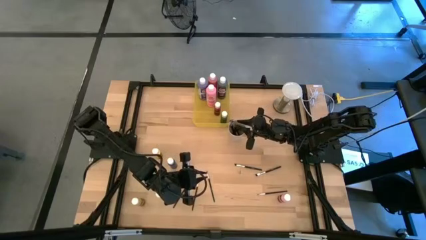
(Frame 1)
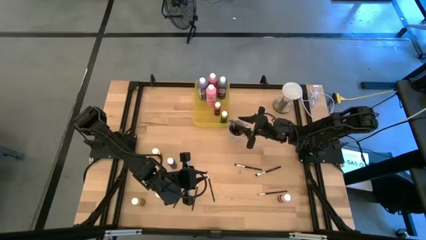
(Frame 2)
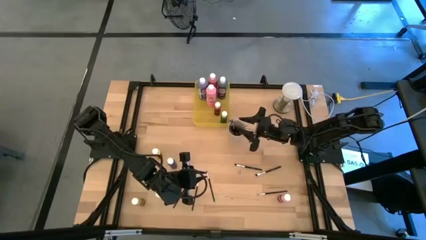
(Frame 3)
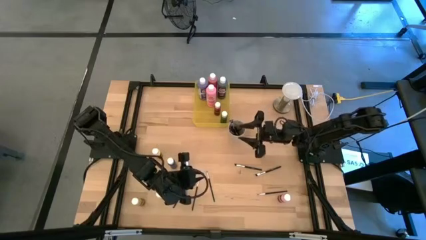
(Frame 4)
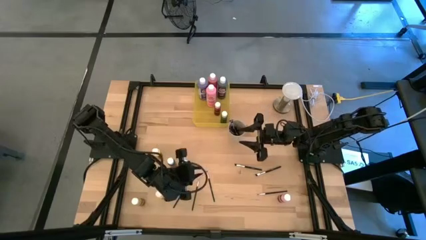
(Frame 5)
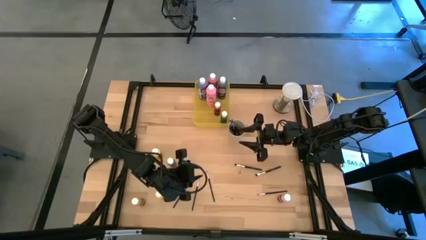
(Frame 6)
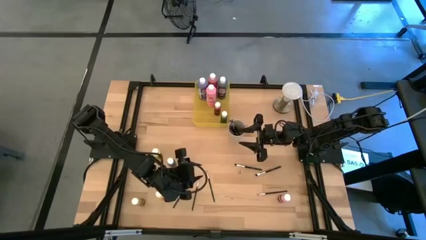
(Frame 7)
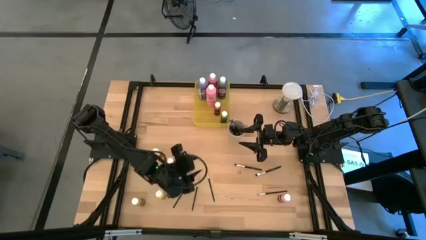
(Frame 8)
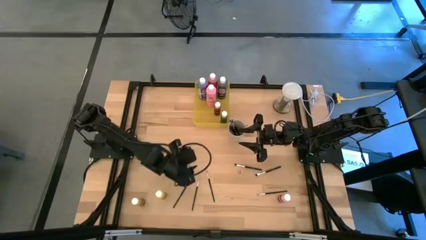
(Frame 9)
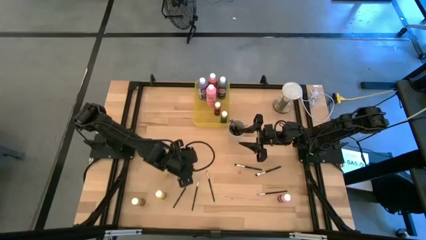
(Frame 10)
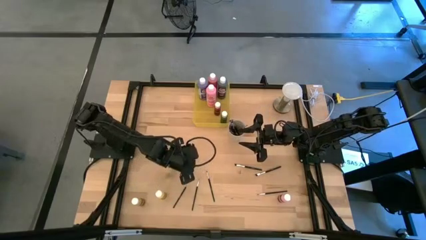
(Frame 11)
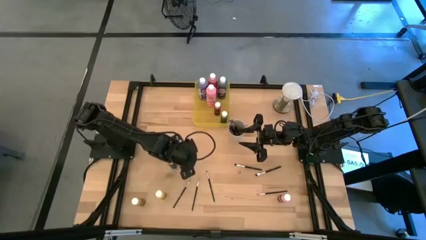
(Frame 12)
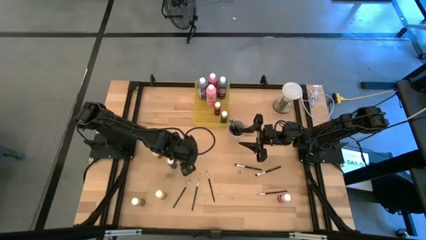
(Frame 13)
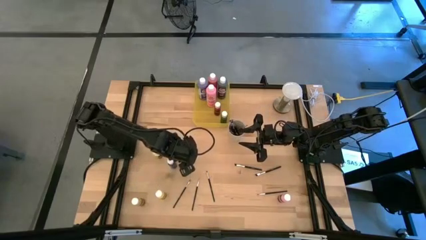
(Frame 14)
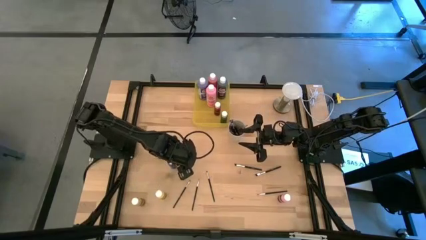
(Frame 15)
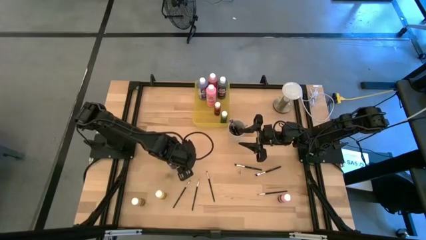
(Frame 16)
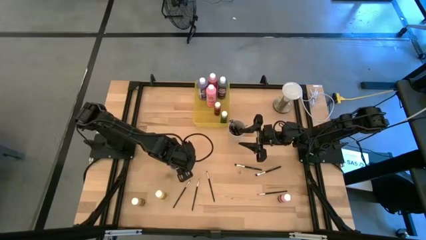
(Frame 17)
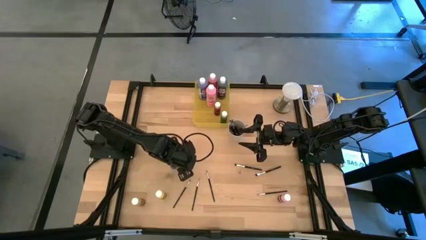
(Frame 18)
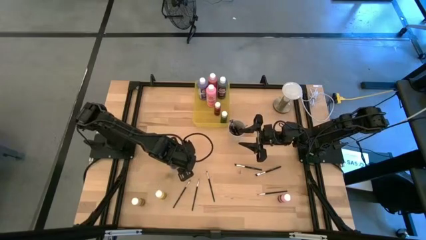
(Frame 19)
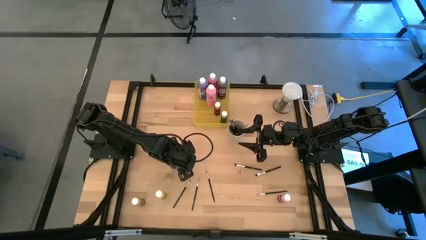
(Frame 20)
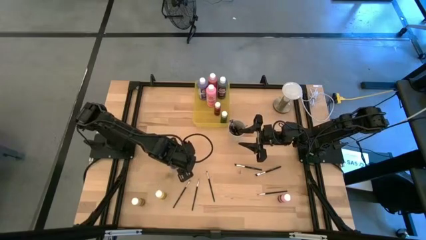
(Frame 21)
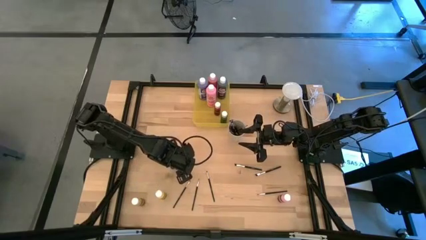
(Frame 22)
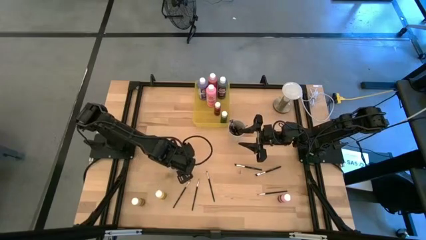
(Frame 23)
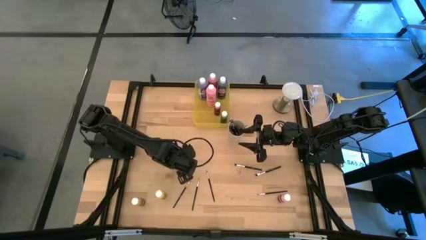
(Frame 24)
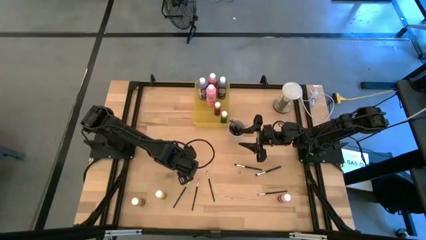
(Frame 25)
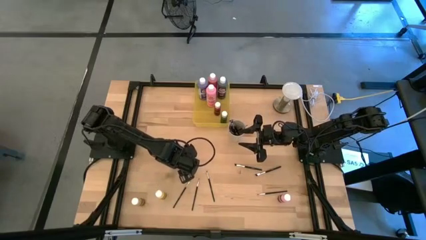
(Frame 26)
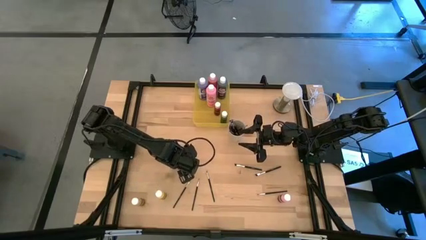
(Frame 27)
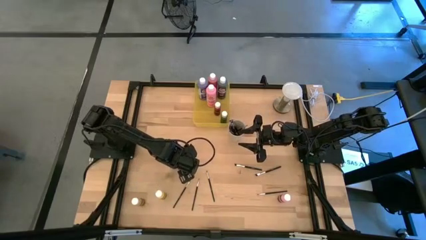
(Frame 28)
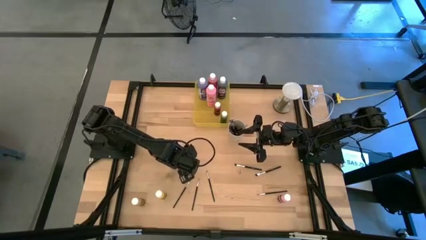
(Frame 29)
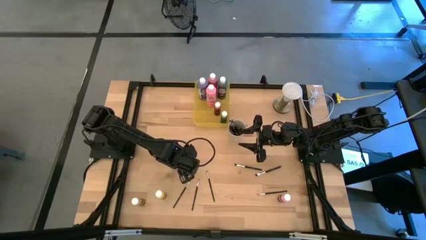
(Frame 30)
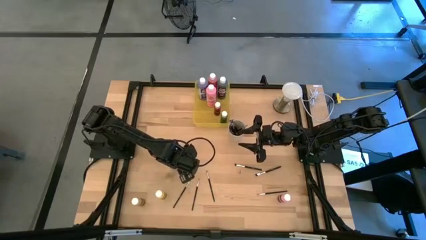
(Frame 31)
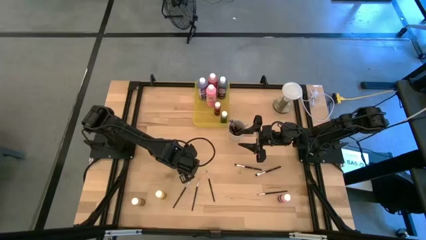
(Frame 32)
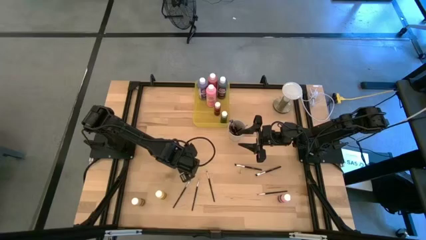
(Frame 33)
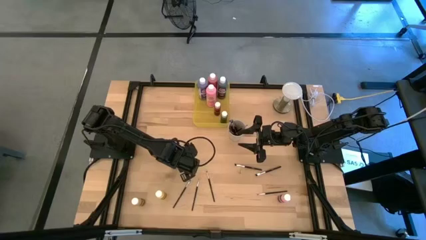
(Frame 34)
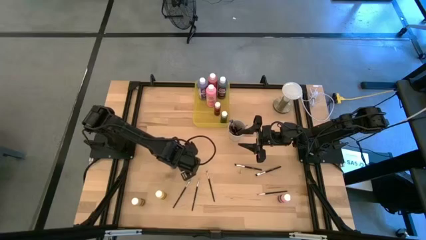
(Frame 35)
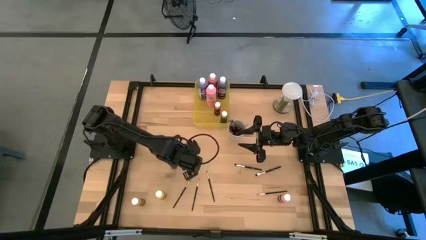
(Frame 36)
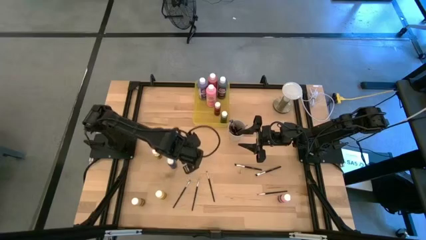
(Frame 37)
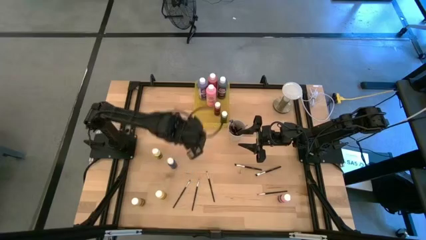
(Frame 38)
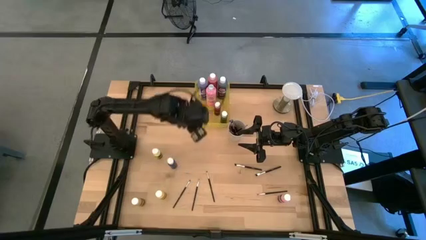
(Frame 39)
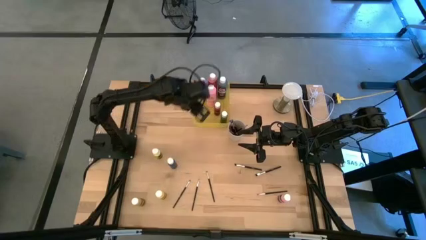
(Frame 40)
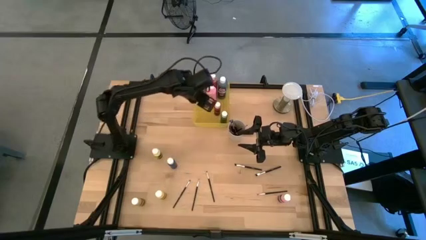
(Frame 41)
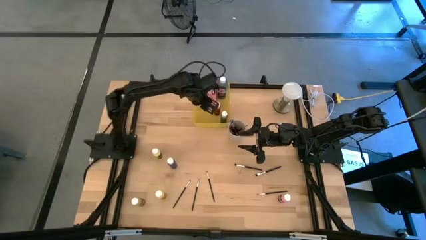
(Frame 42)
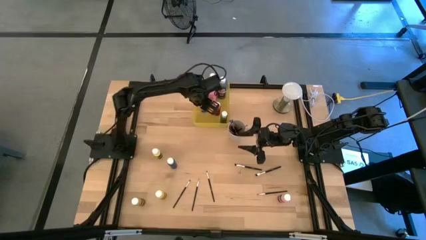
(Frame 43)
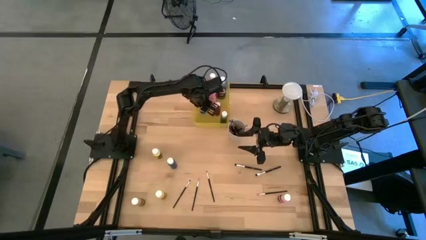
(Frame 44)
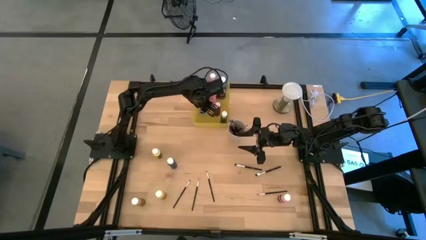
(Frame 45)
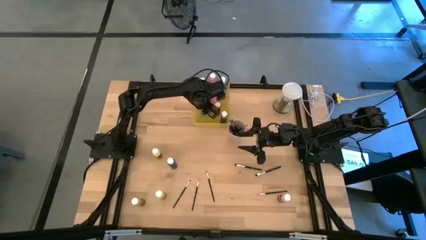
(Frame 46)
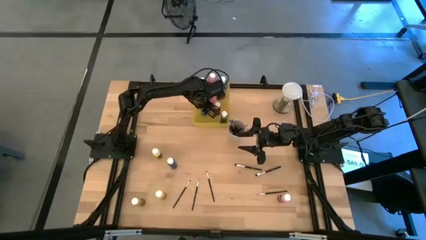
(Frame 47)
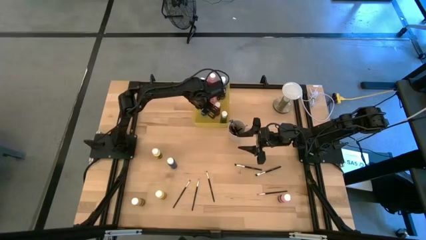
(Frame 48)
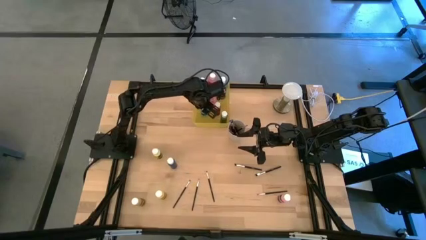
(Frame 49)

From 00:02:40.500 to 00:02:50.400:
Task: Pick & Place Paint Supplies
Put the small light blue paint bottle into the yellow bin

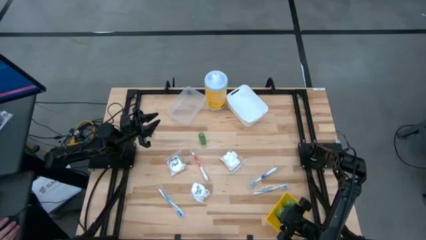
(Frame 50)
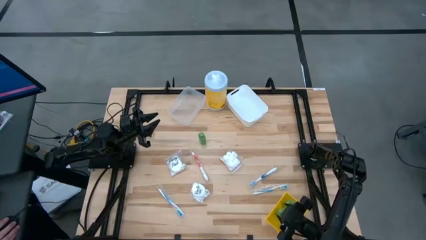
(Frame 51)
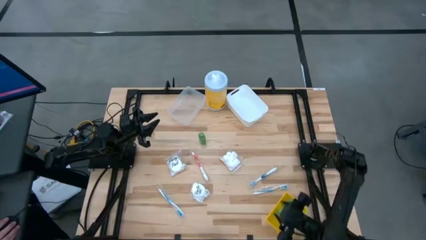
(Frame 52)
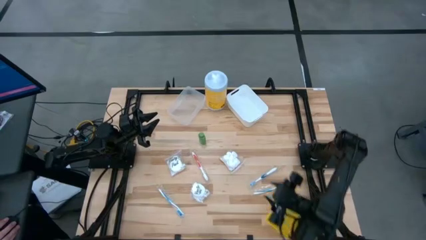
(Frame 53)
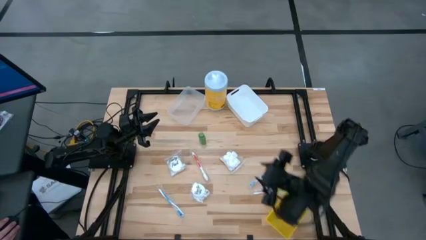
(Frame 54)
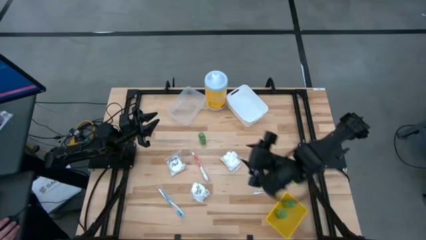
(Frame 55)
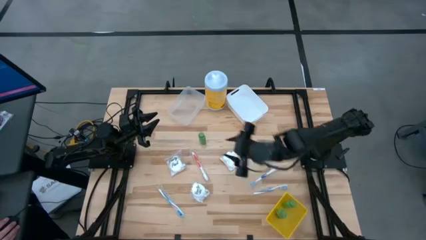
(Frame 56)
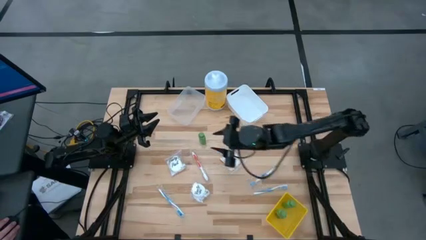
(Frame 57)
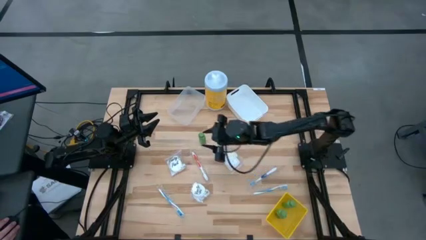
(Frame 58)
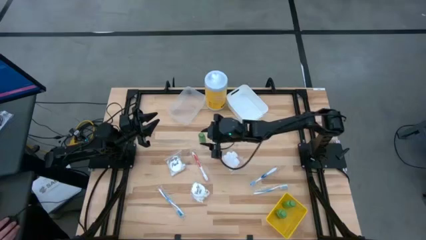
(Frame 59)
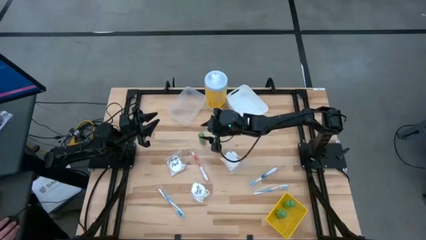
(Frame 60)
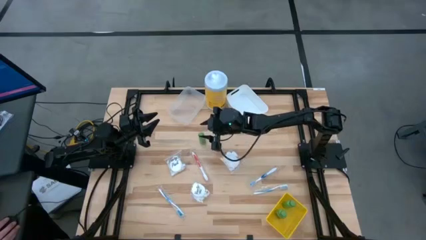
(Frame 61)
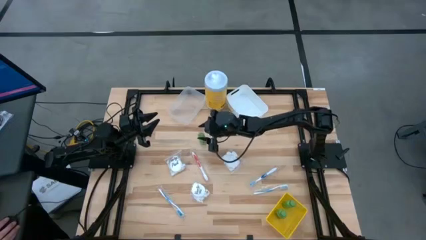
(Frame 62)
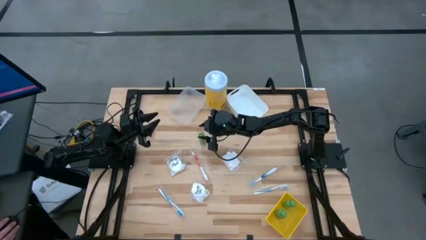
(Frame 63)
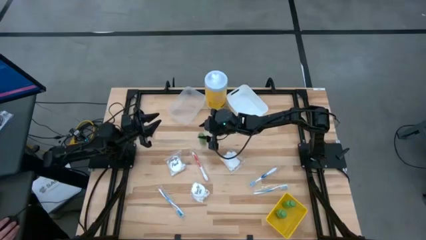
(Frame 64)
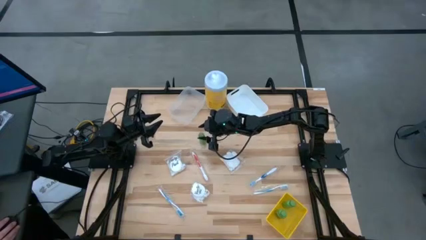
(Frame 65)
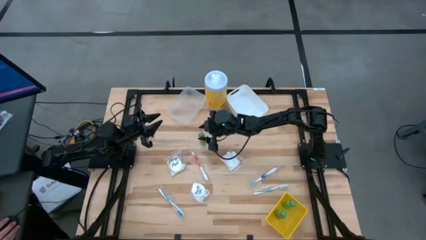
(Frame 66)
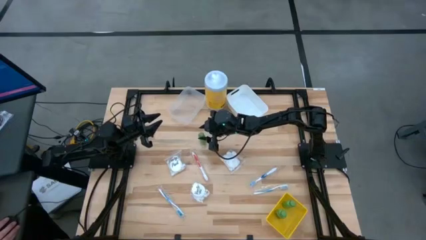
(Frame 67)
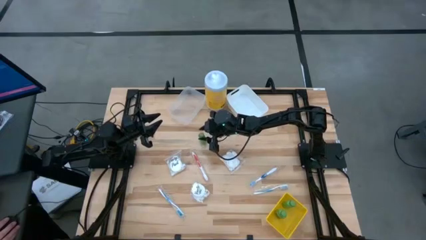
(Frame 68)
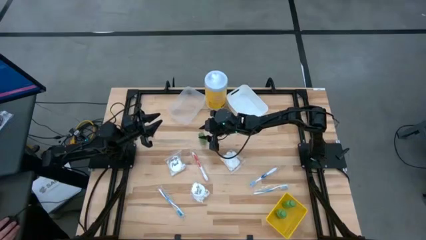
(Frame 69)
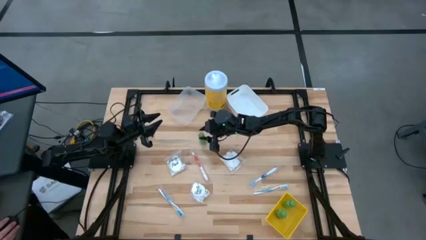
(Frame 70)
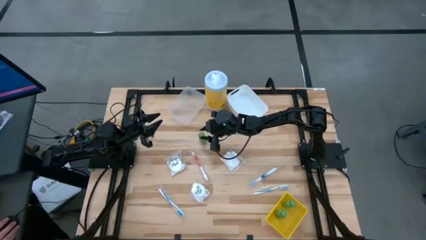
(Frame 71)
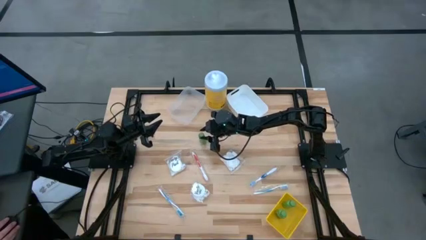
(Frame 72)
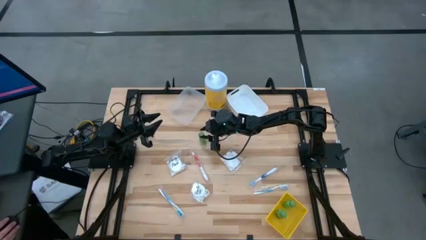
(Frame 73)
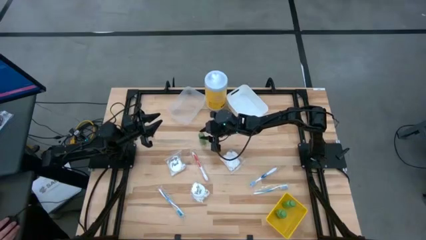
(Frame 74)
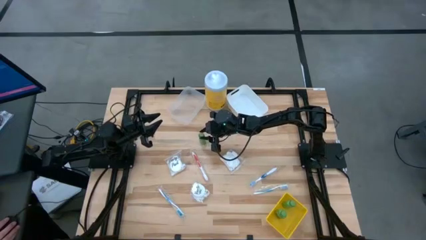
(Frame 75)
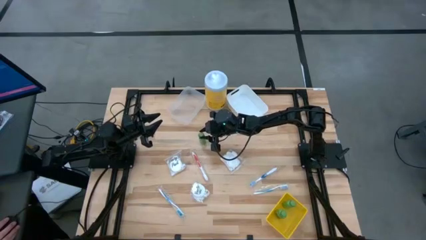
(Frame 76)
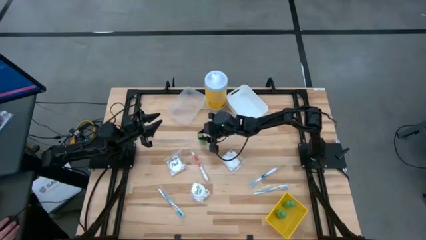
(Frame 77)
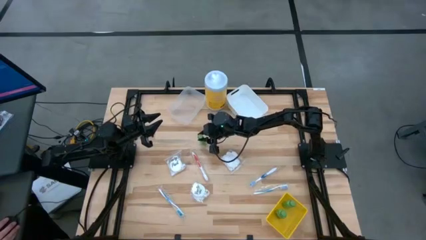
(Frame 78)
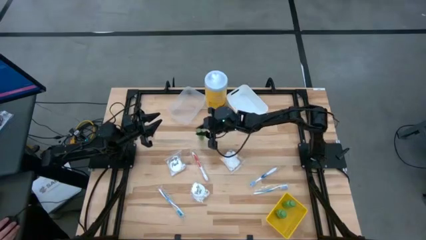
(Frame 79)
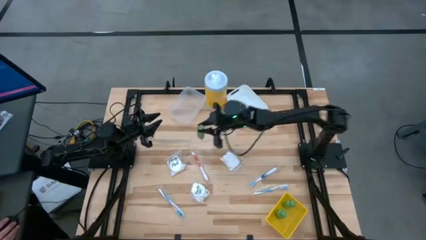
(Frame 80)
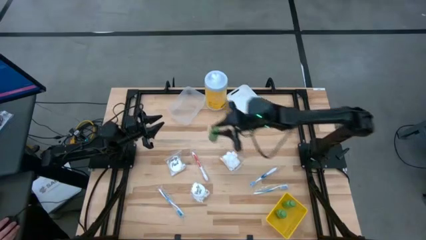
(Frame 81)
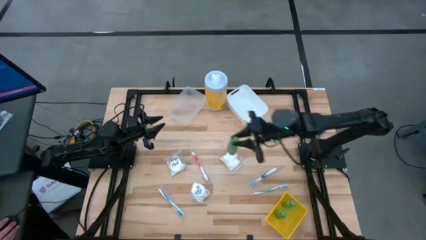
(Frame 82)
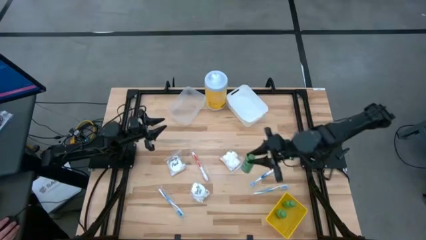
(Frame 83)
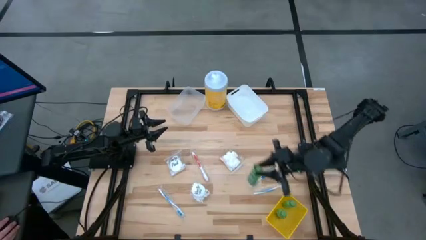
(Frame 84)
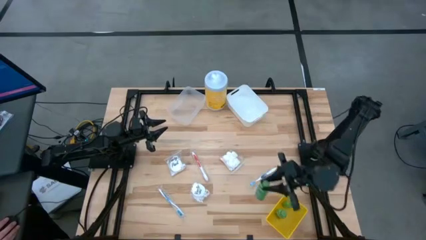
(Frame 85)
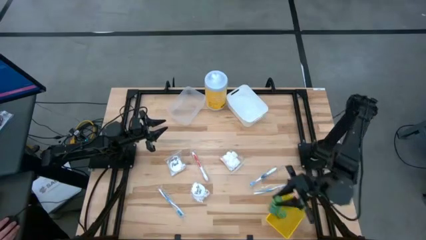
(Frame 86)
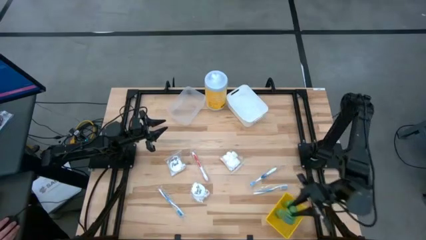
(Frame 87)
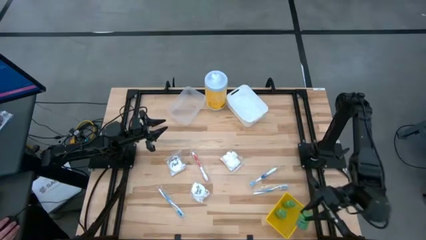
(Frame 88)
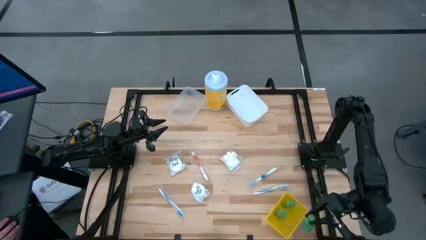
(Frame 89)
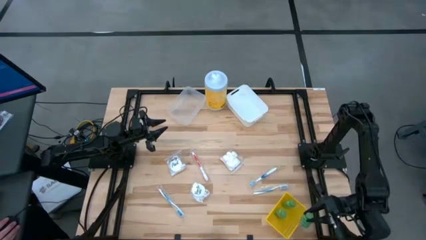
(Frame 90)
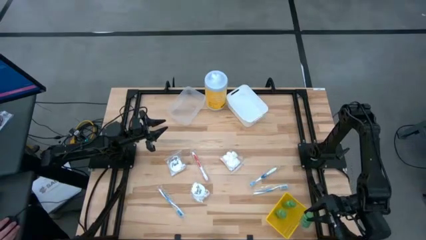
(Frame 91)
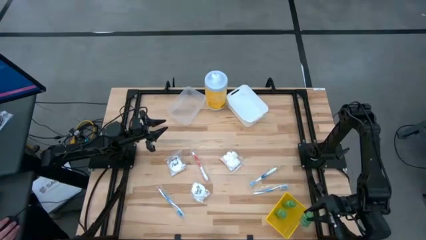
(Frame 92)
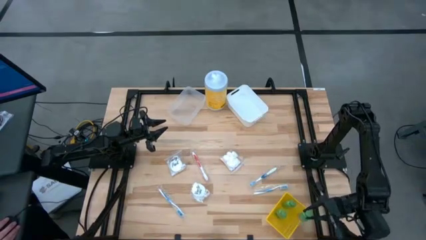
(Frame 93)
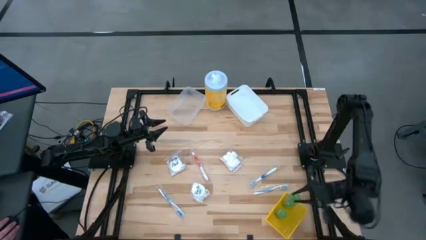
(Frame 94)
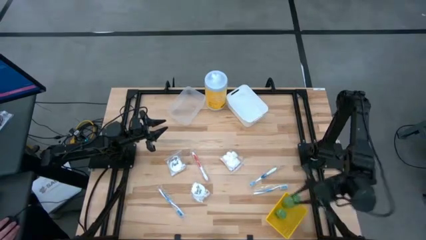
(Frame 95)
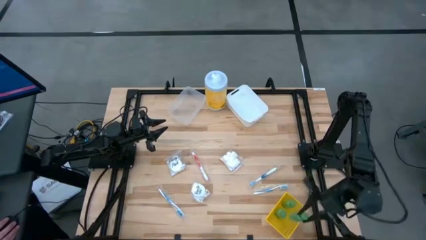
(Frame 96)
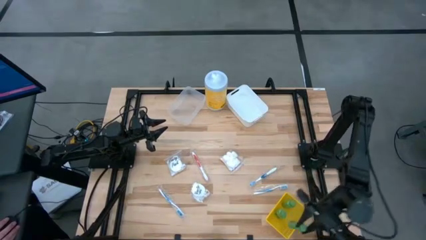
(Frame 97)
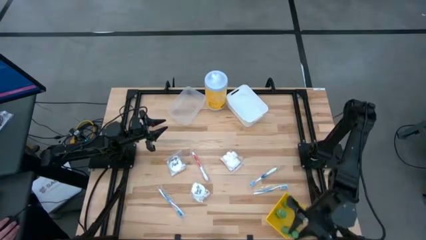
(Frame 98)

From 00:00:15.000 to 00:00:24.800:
Task: Pick & Place Travel size toiletries
Put the shampoo into the yellow bin
